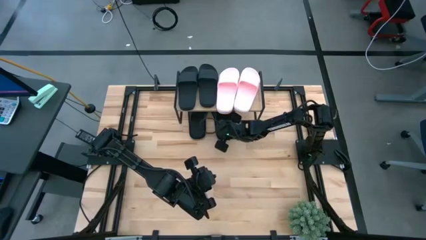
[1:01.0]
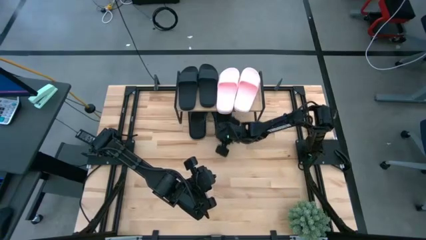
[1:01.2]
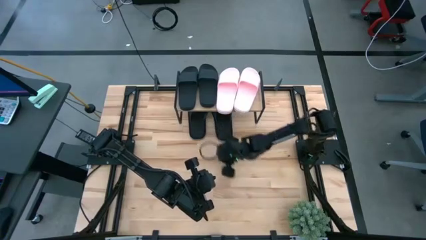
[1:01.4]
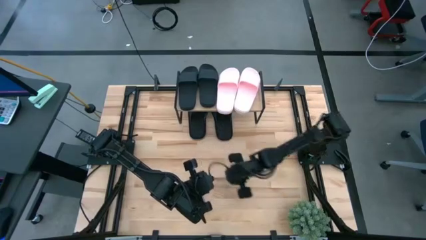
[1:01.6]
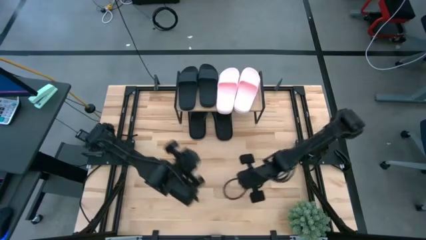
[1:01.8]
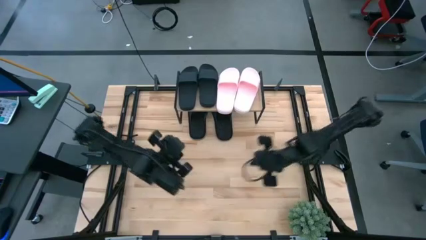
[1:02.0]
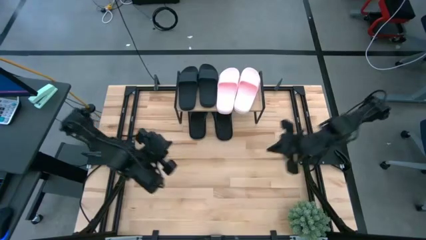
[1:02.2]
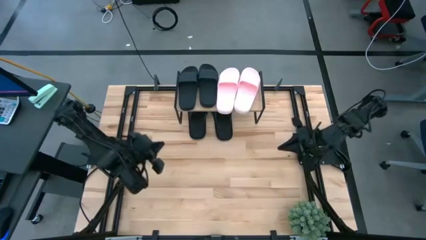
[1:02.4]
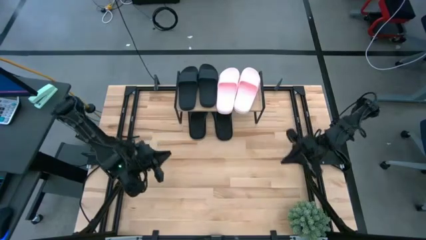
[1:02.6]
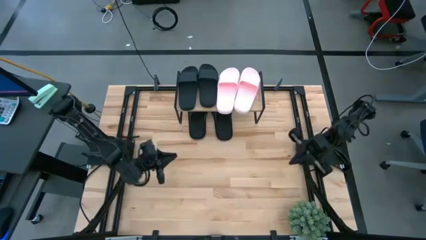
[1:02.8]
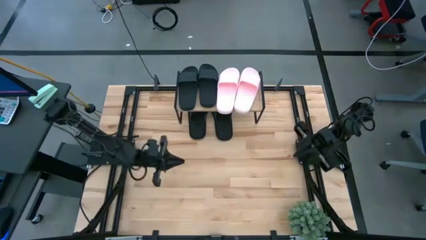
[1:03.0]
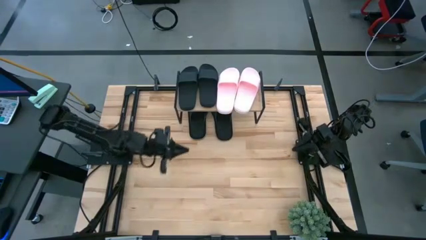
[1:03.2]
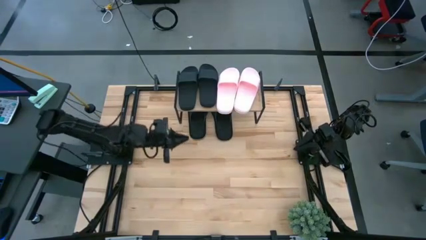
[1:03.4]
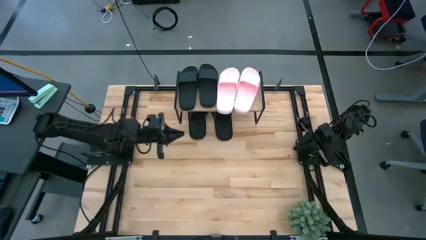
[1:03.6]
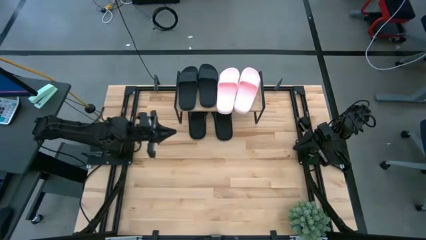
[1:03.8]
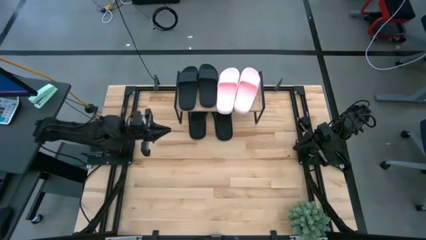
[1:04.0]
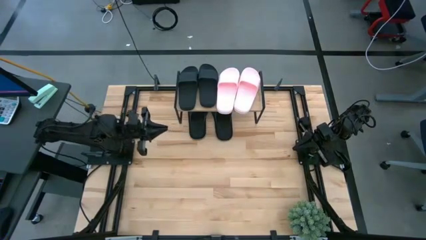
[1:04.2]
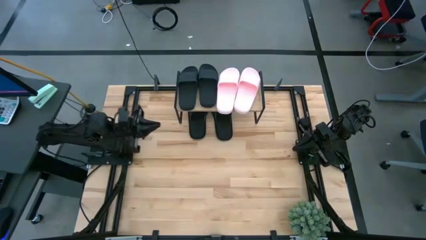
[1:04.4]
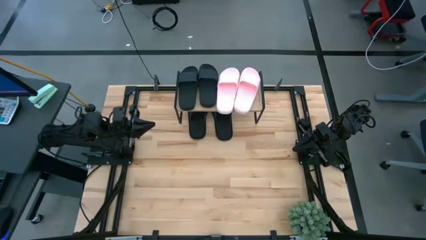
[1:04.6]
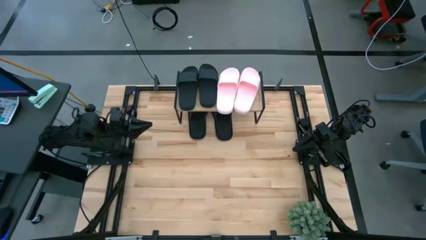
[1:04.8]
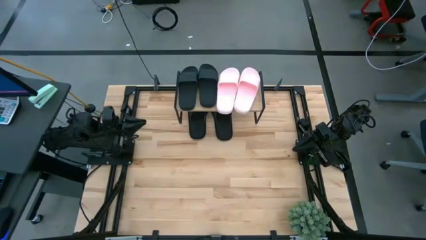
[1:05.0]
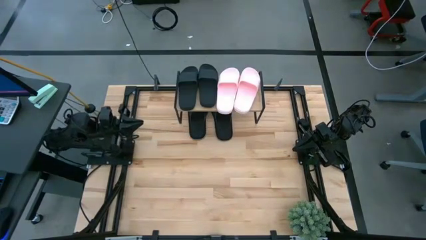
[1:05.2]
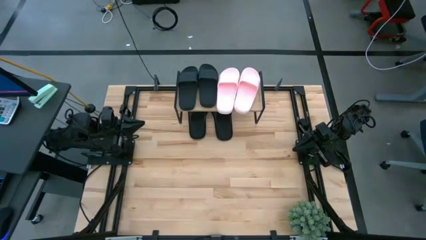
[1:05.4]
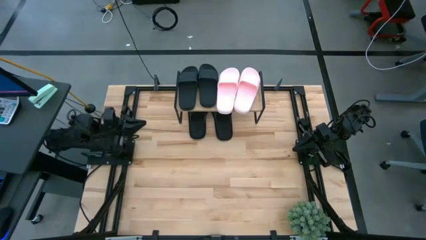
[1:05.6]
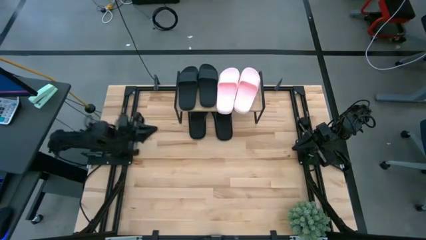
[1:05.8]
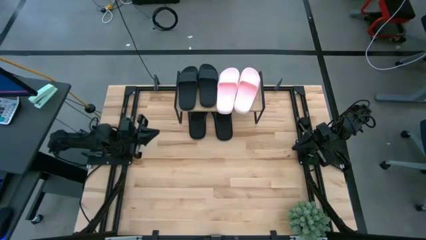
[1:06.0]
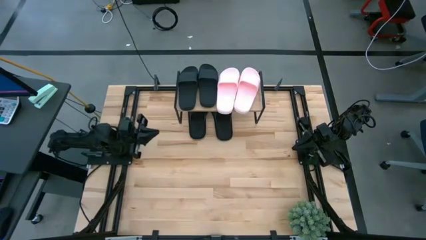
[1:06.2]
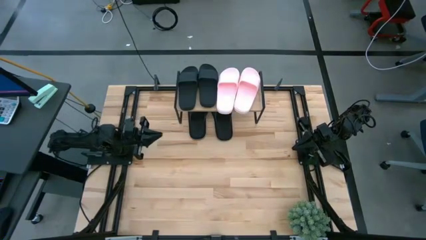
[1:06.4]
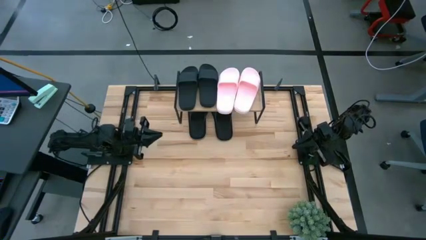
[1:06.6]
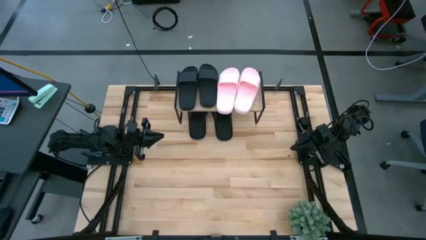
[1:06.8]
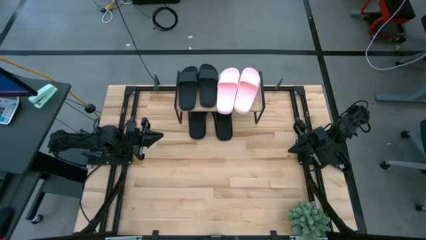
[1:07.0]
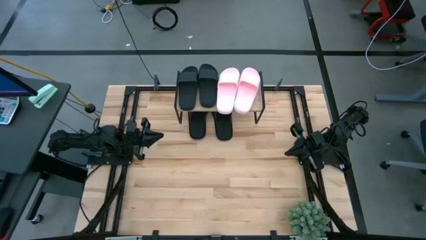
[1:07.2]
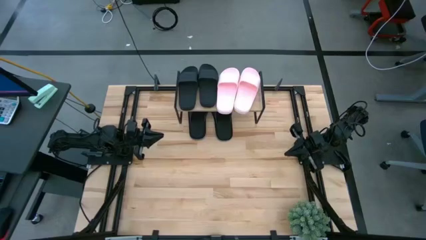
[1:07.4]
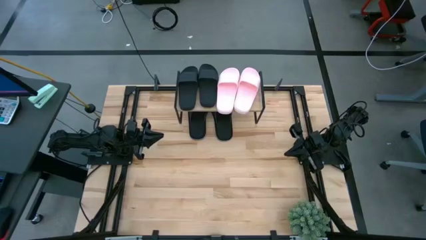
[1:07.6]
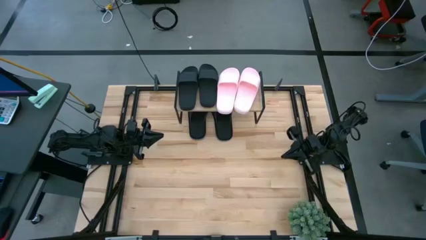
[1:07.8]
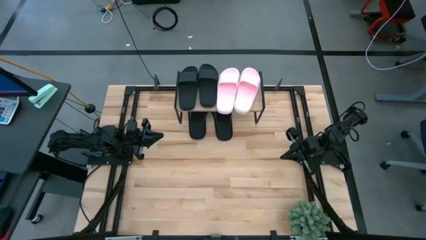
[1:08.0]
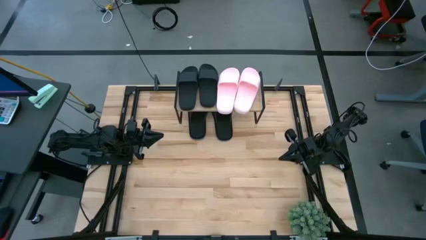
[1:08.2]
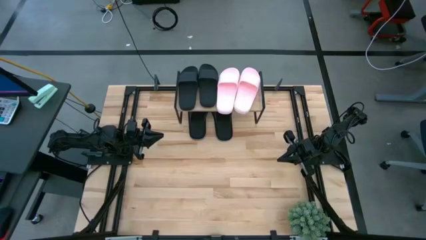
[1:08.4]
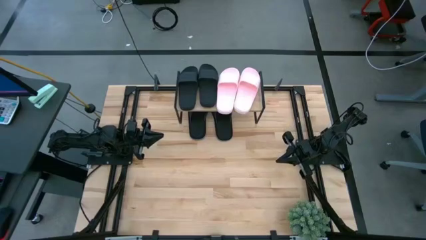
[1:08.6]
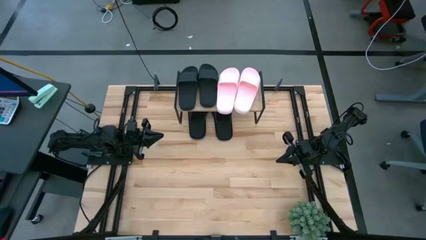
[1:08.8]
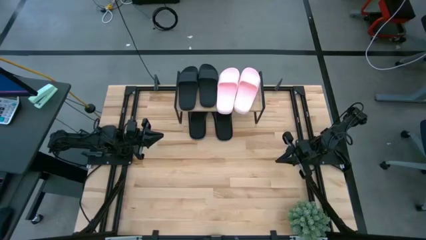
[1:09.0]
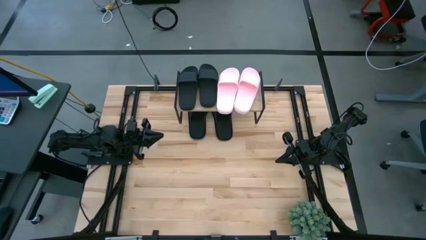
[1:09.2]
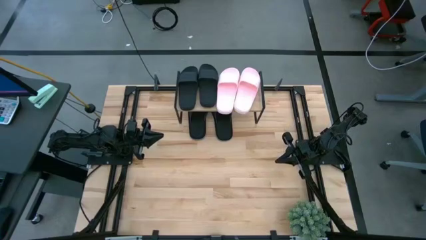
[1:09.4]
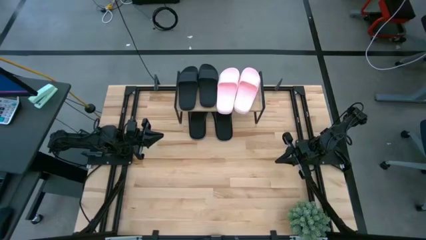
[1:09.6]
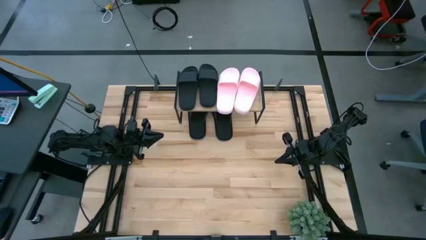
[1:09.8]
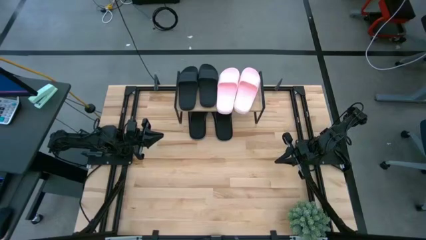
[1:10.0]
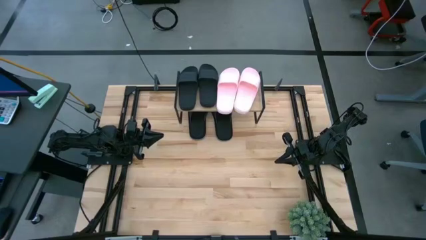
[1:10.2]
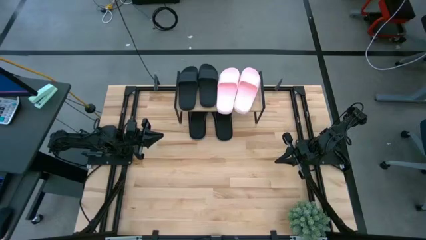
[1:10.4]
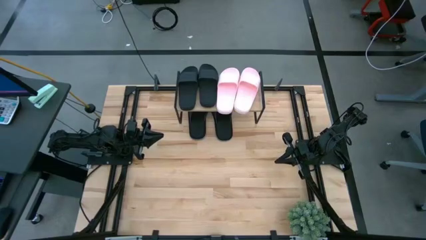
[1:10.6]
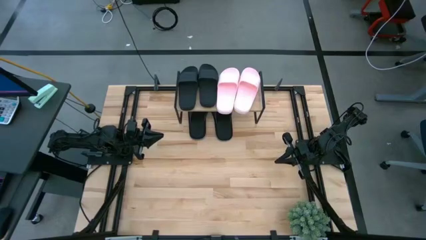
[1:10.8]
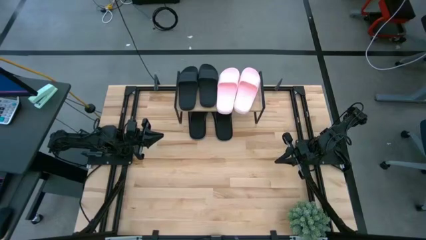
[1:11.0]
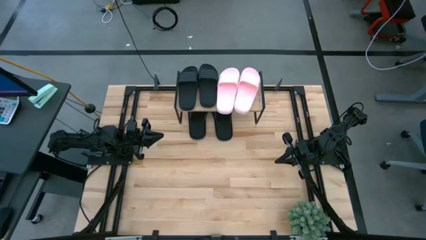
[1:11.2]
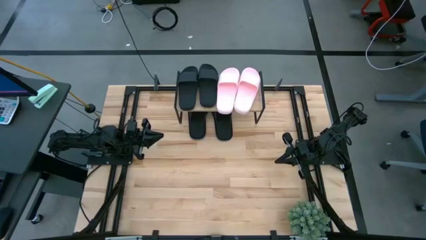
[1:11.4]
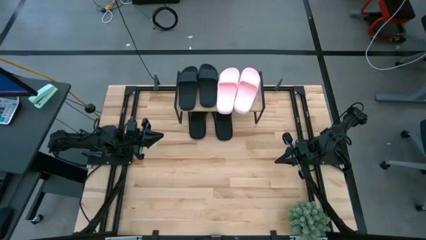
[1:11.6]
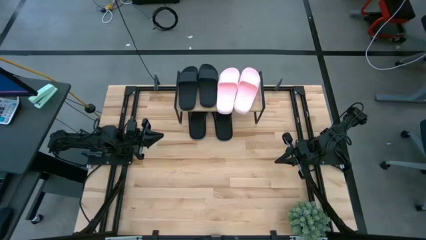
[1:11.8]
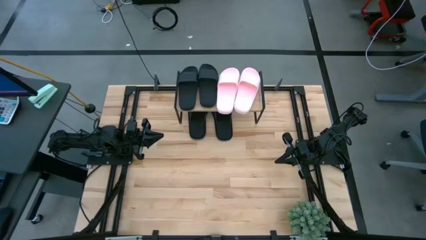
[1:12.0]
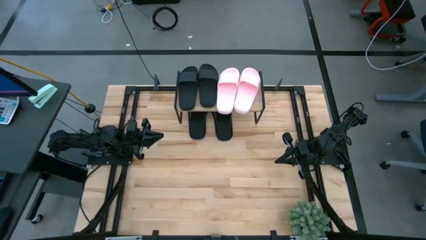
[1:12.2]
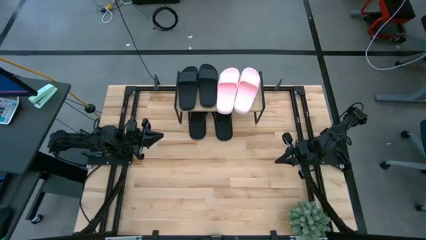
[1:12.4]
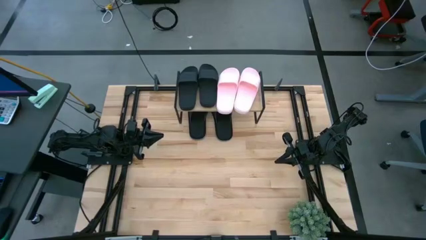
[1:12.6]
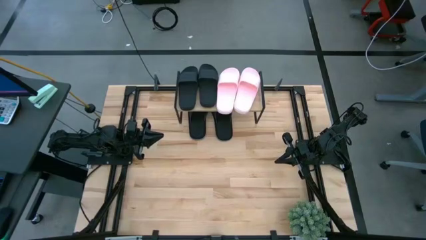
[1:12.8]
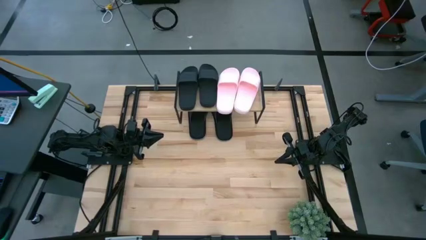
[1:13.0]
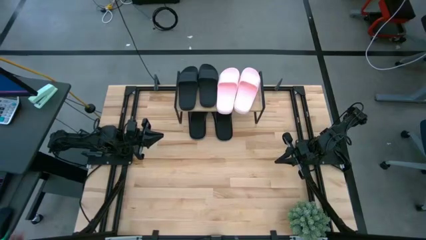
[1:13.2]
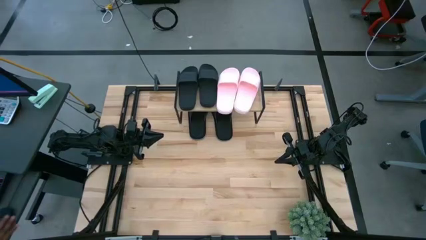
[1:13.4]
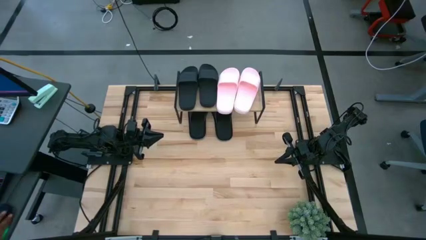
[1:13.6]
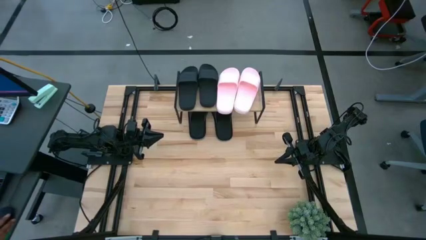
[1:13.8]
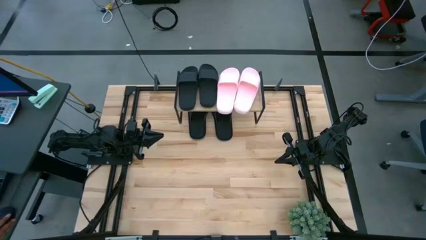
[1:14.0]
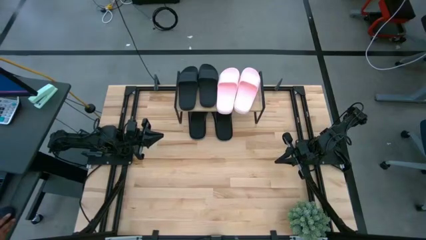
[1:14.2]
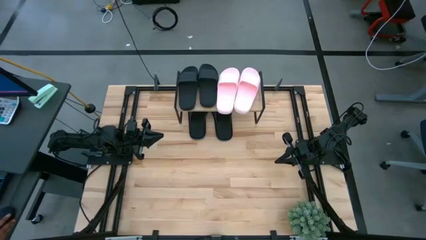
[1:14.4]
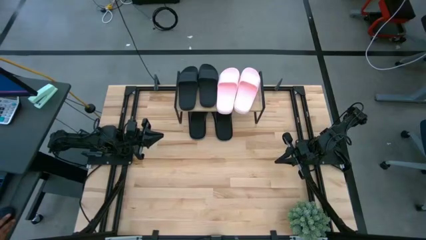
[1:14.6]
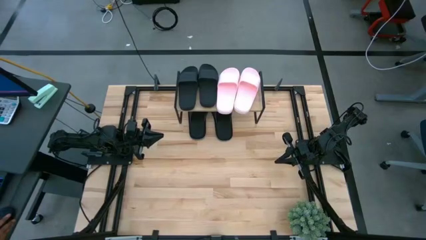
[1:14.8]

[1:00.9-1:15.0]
Task: Pick and place slides into the shelf
Return to Home Position
